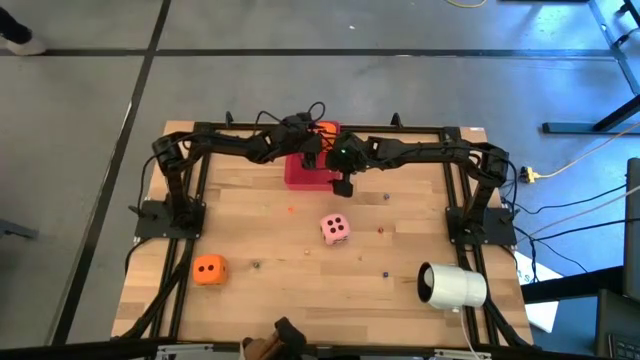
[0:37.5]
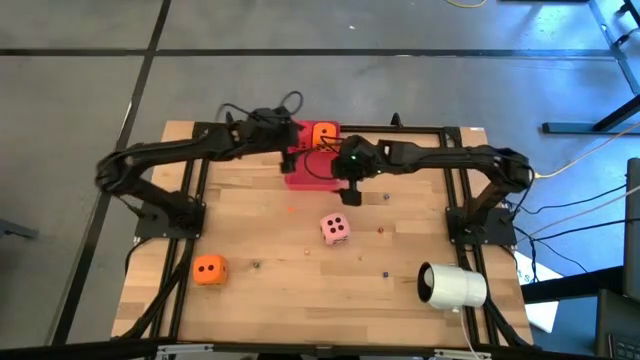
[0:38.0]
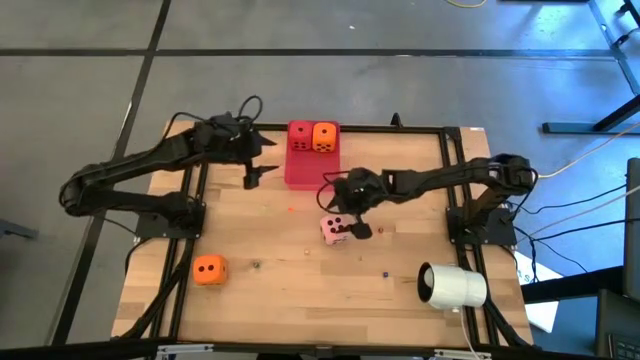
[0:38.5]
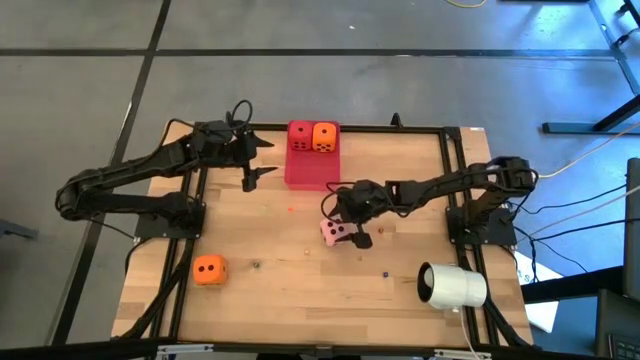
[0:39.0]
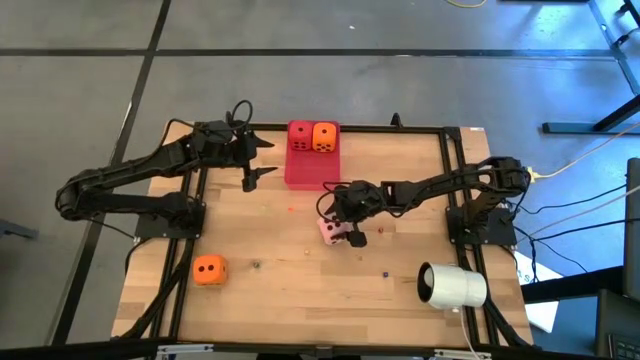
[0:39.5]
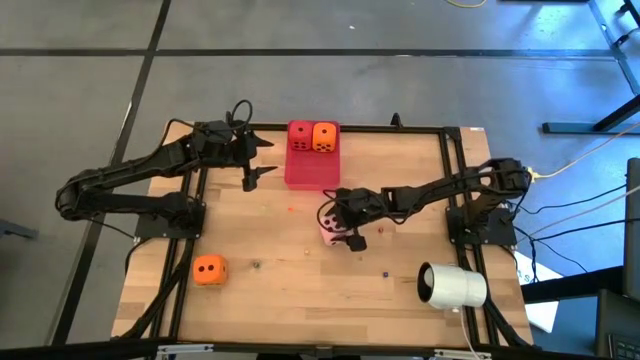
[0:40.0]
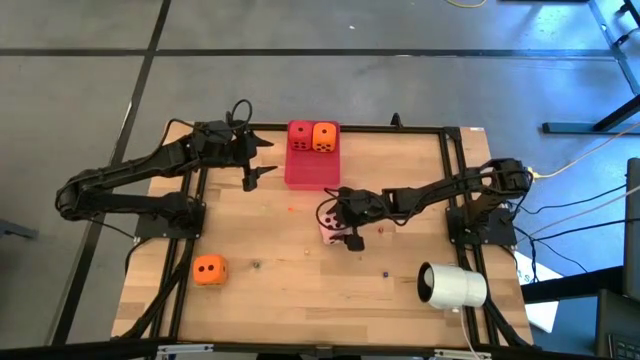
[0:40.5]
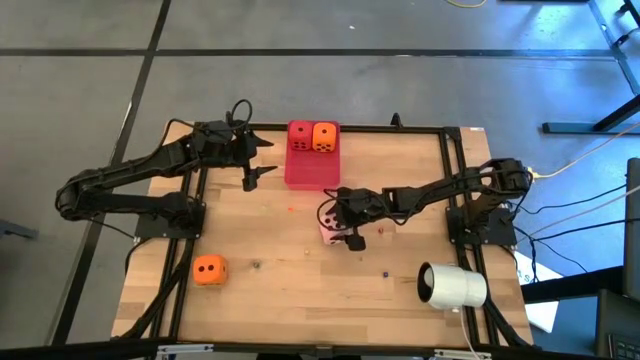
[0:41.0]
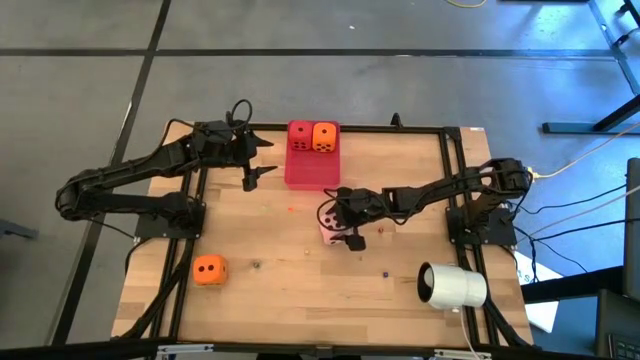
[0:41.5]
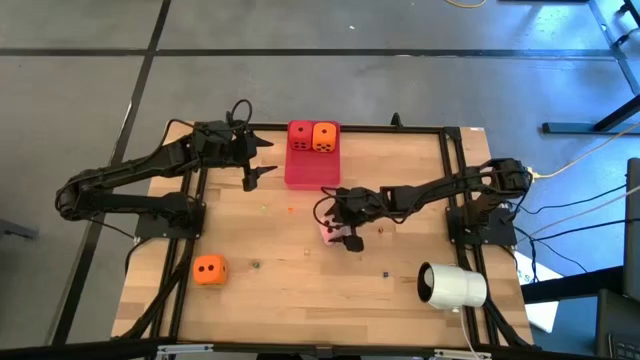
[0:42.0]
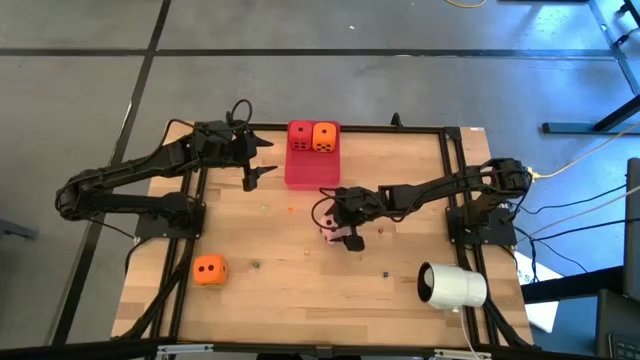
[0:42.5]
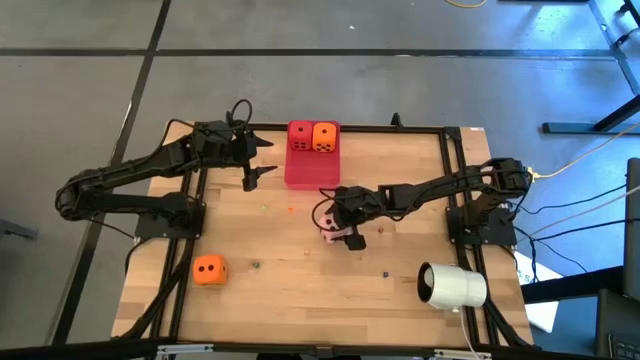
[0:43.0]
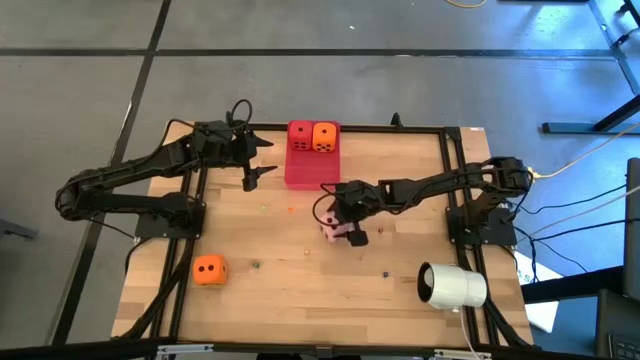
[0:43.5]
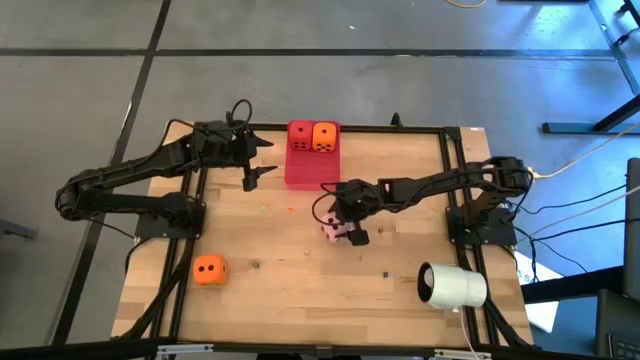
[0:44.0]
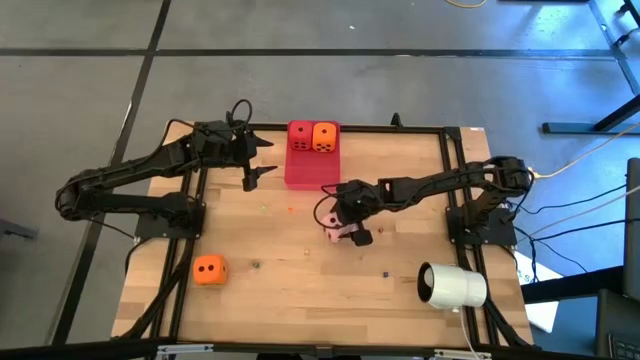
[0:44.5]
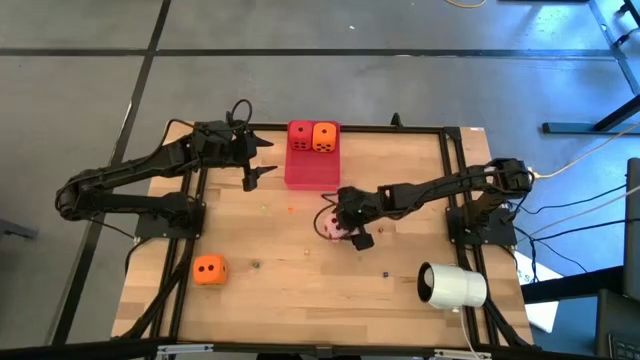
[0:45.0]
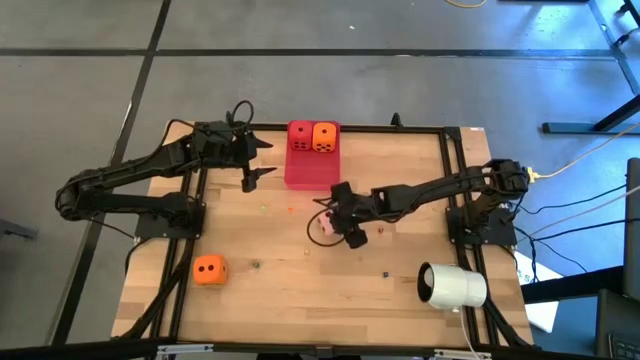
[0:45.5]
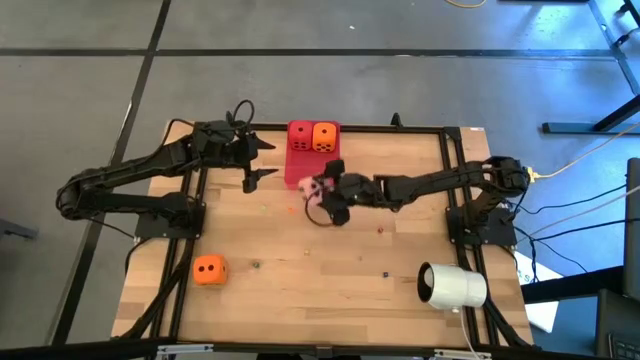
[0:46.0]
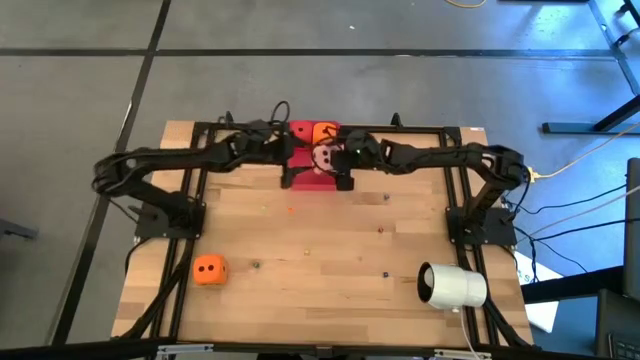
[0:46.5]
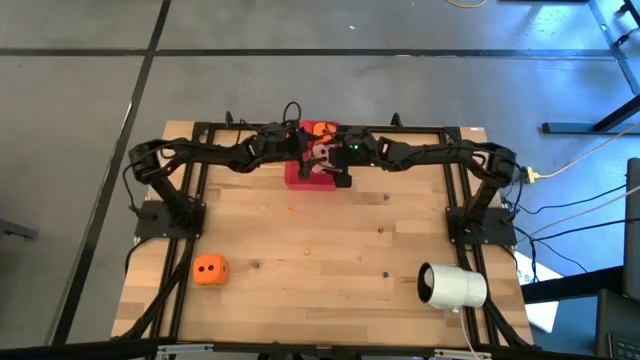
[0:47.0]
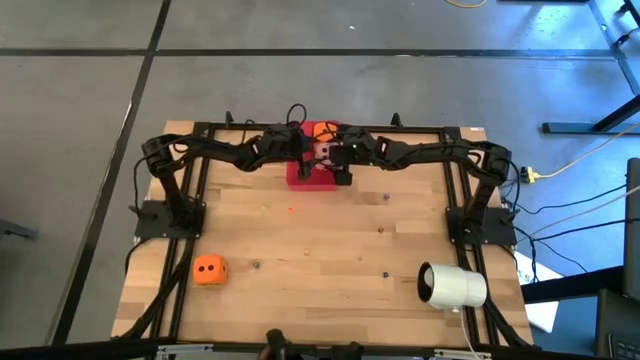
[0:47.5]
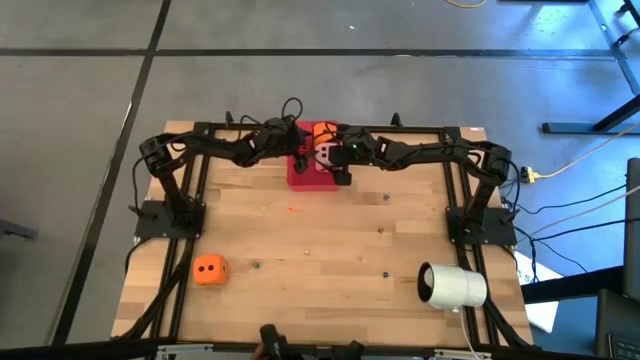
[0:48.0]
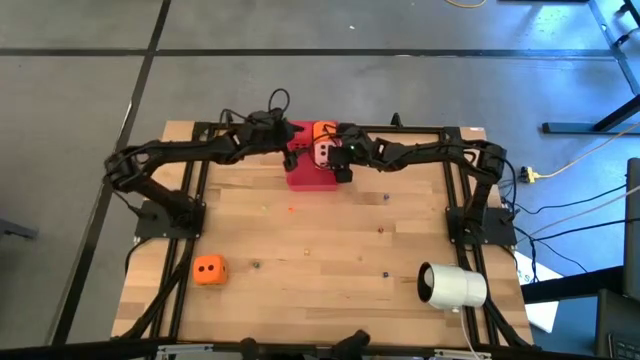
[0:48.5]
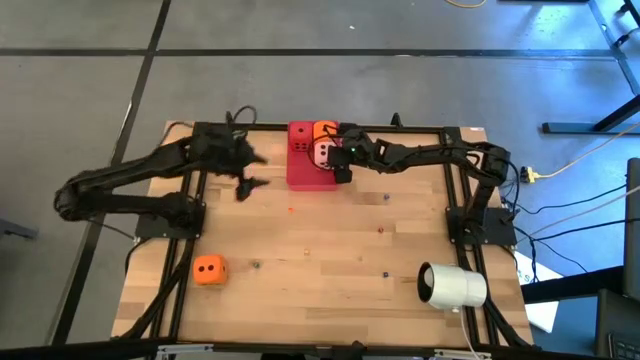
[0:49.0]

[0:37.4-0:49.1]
Task: Pick & Place Dice
Put the large pink dice into the bin

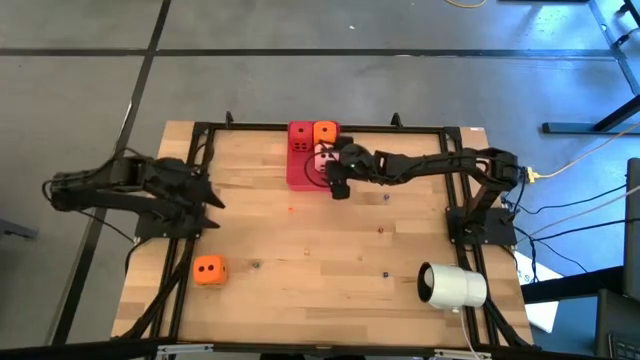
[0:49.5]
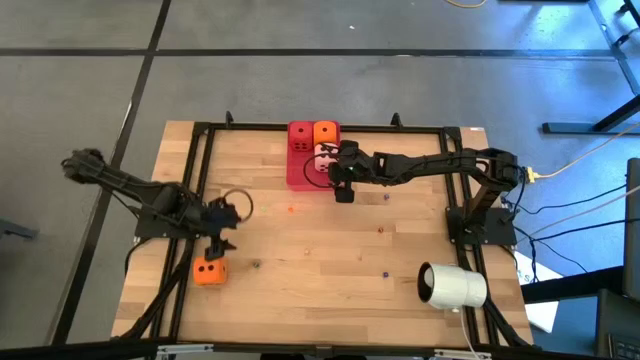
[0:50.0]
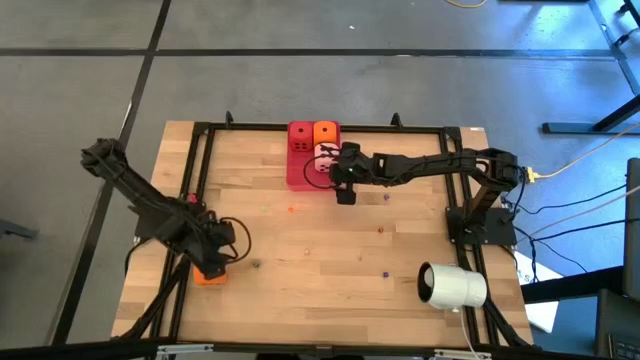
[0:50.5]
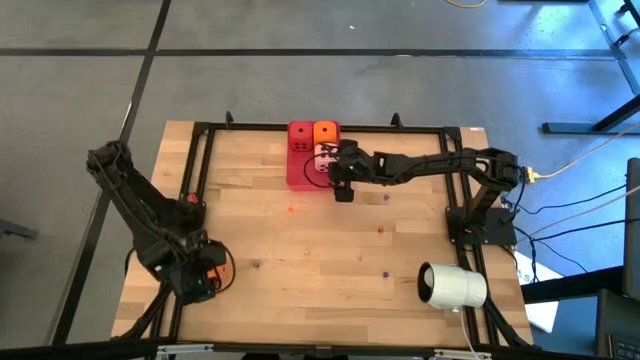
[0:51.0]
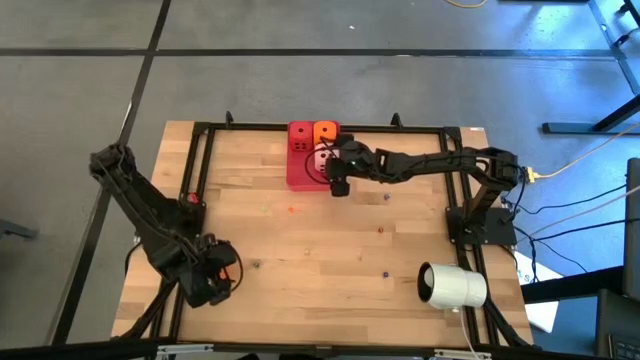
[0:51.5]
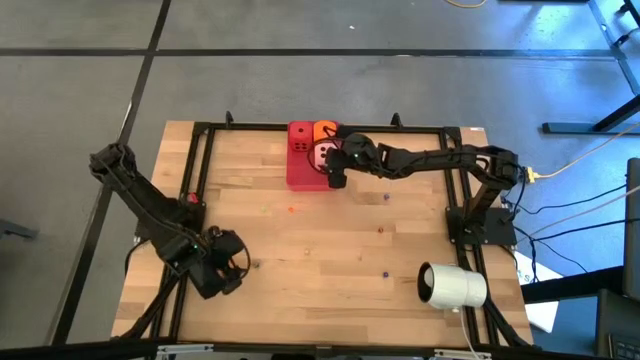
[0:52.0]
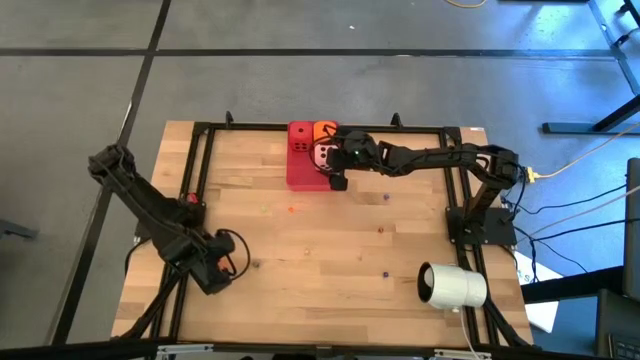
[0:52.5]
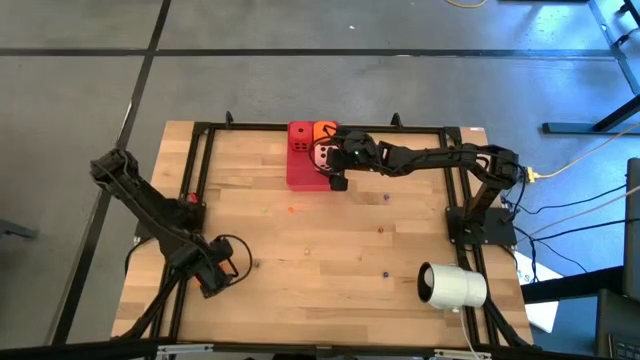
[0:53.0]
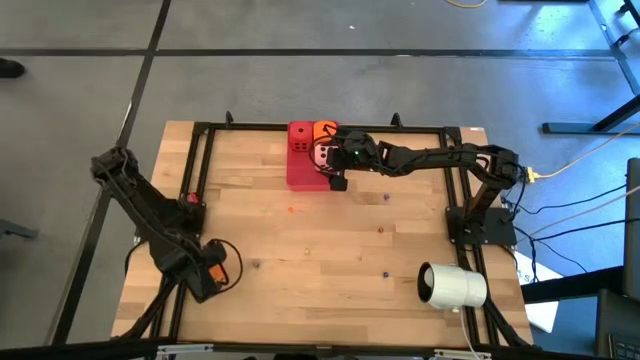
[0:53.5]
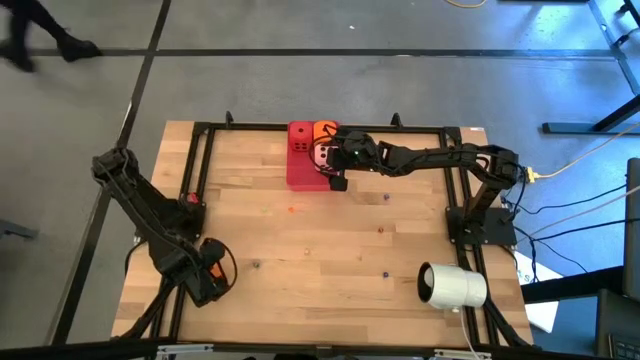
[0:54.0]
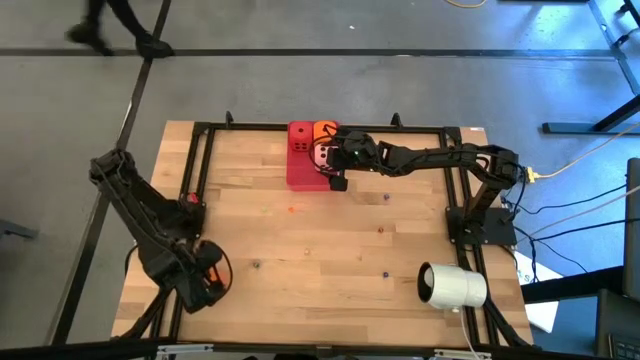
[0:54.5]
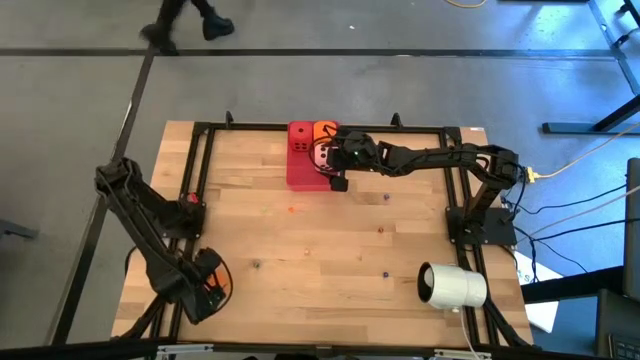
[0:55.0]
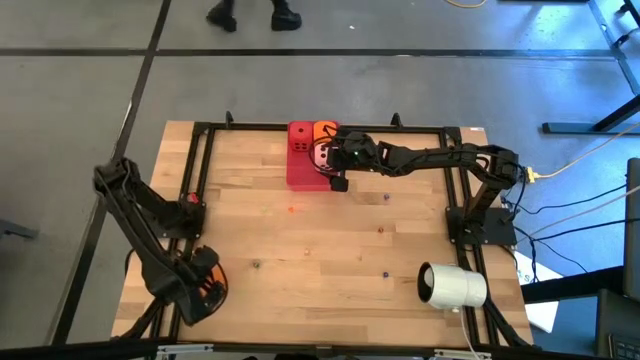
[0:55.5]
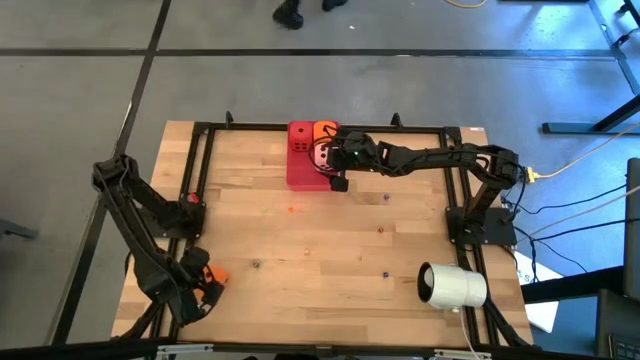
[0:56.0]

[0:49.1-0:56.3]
Put the large orange dice into the bin

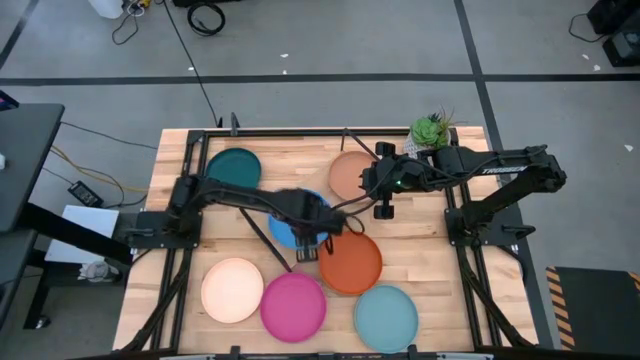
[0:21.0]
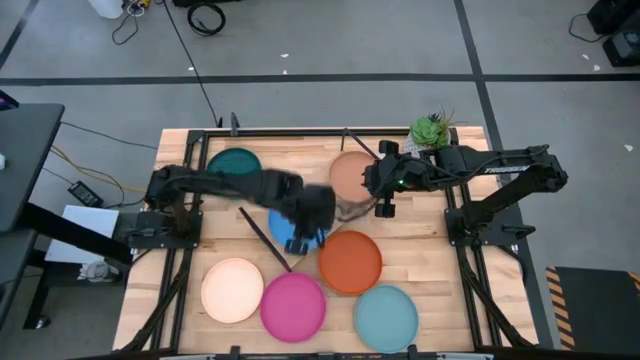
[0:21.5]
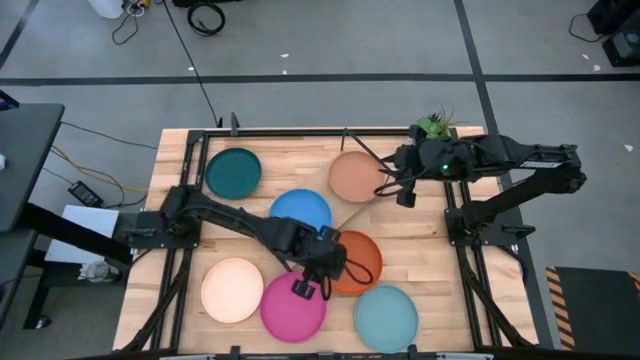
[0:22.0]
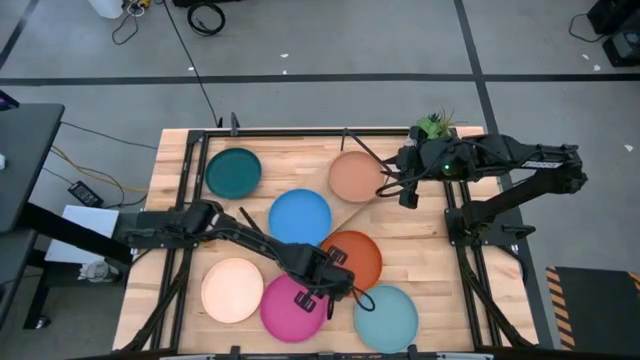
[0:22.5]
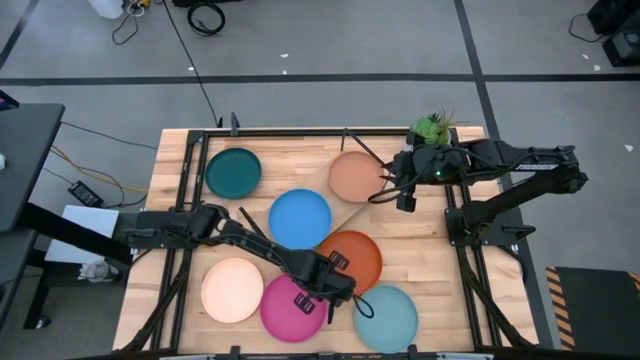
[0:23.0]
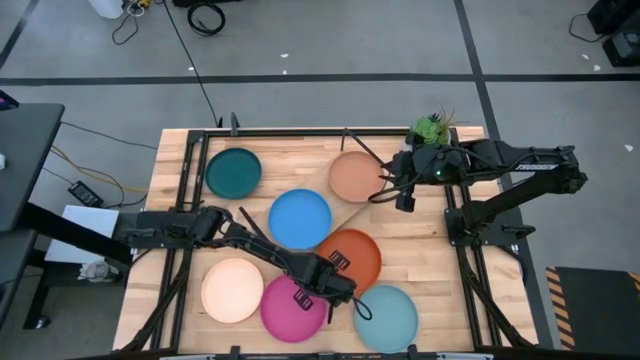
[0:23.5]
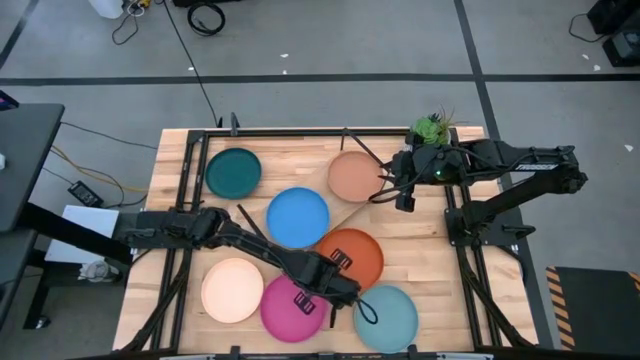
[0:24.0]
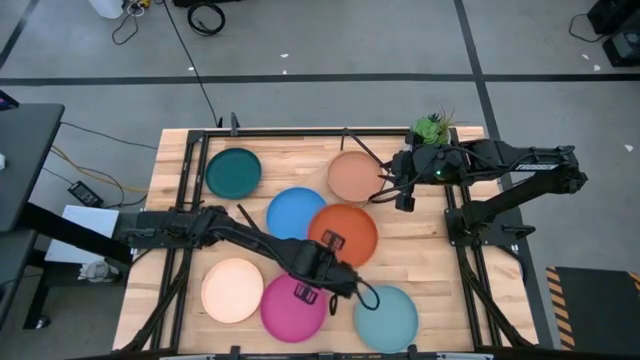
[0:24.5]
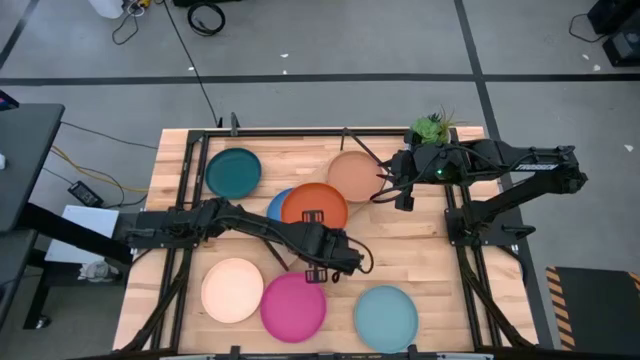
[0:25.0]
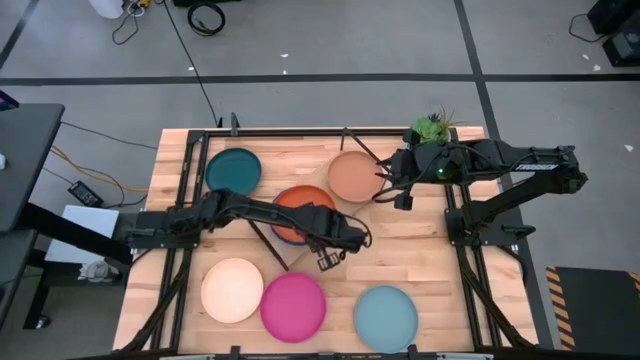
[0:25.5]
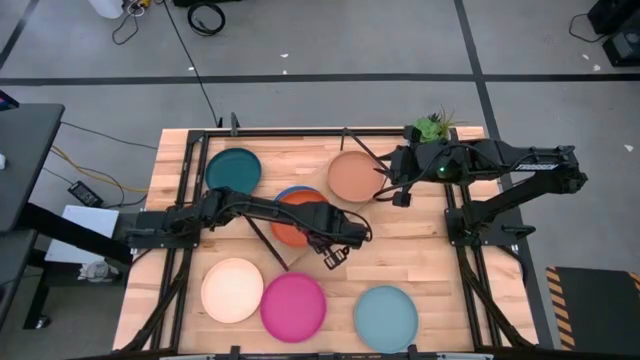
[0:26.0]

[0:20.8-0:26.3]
Task: Place and stack plates onto a shelf
Stack the orange plate on top of the blue plate on the shelf
